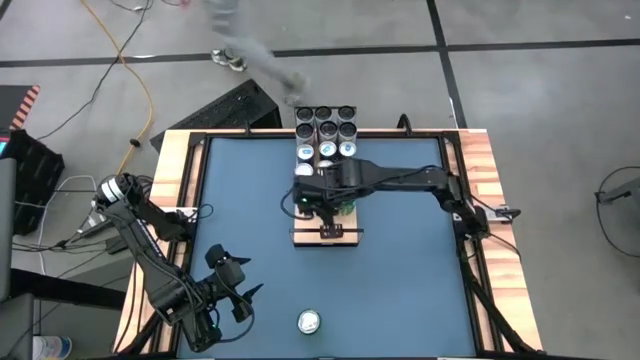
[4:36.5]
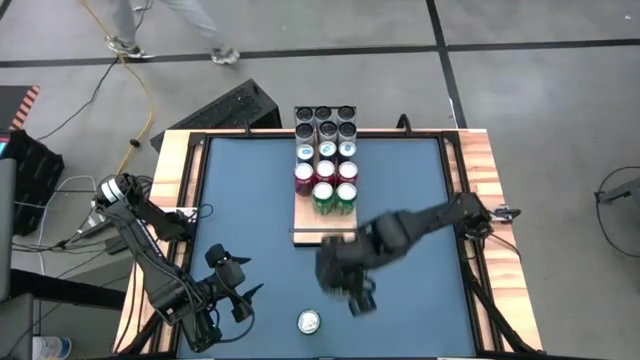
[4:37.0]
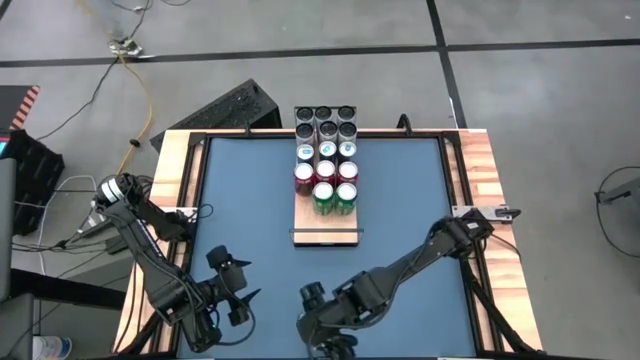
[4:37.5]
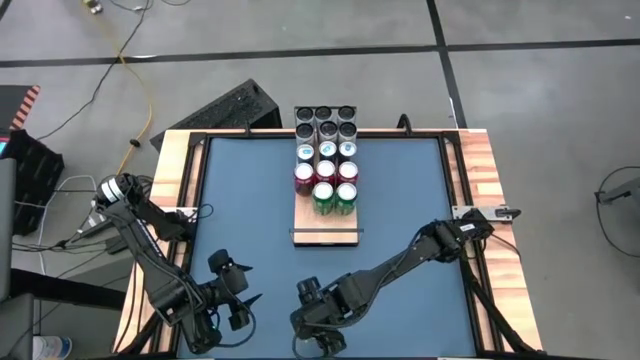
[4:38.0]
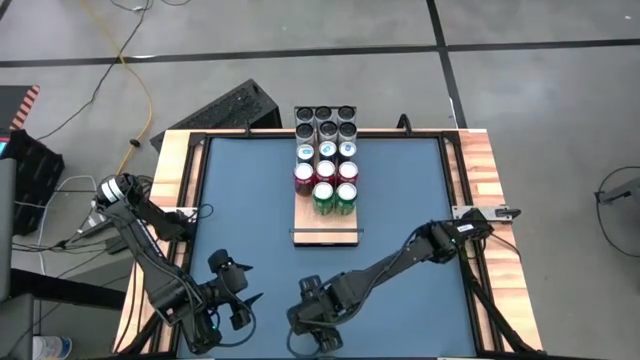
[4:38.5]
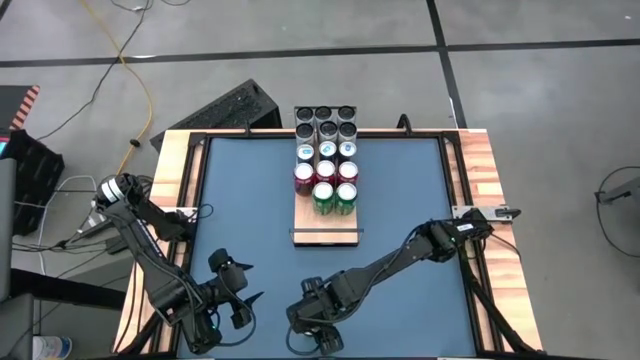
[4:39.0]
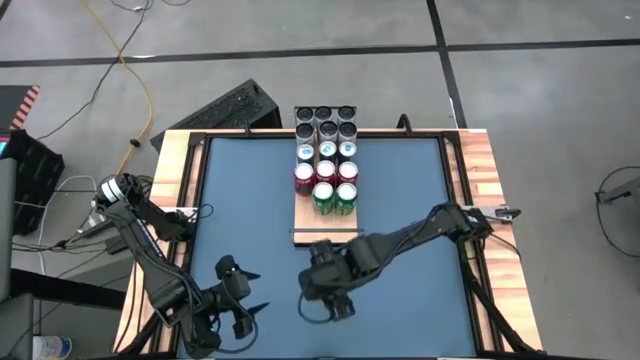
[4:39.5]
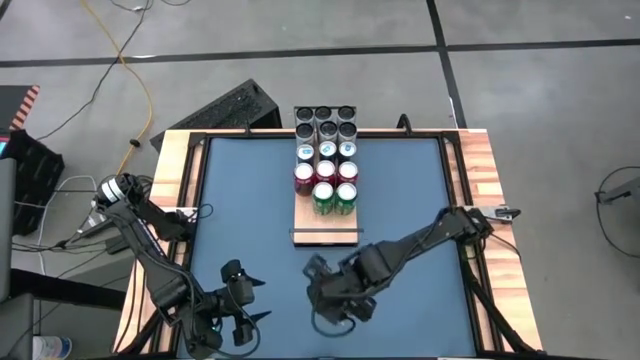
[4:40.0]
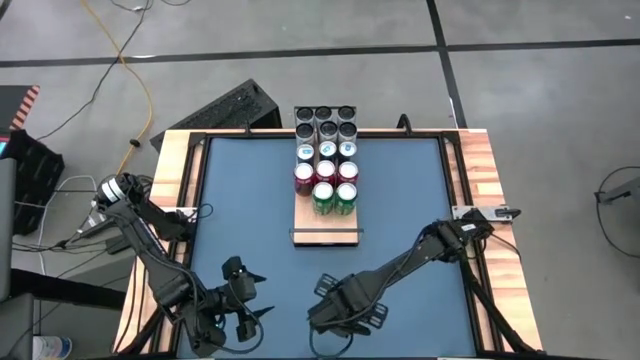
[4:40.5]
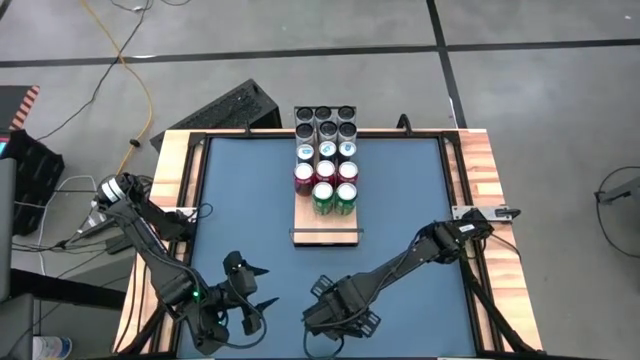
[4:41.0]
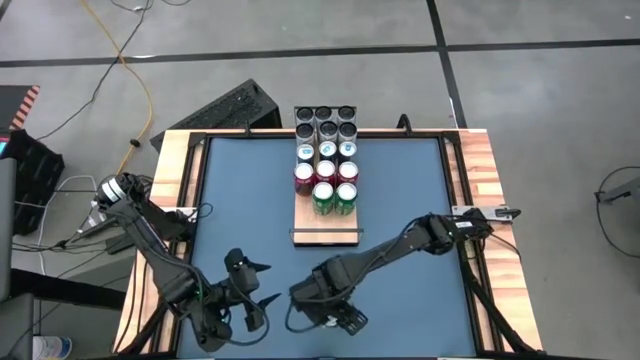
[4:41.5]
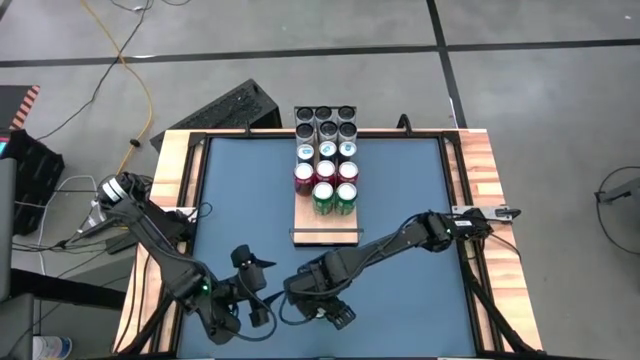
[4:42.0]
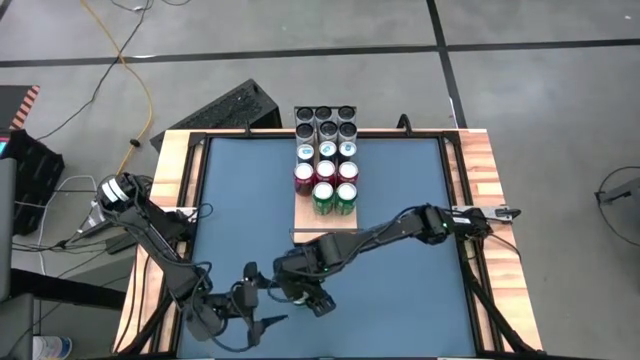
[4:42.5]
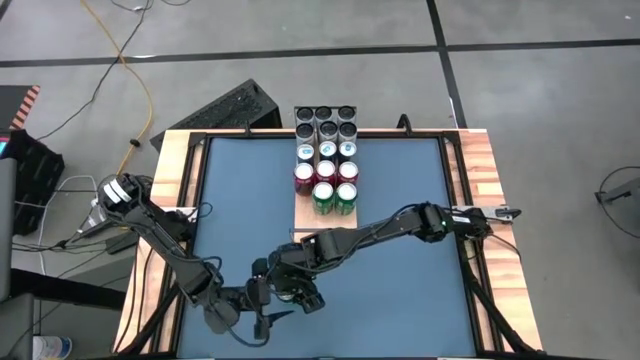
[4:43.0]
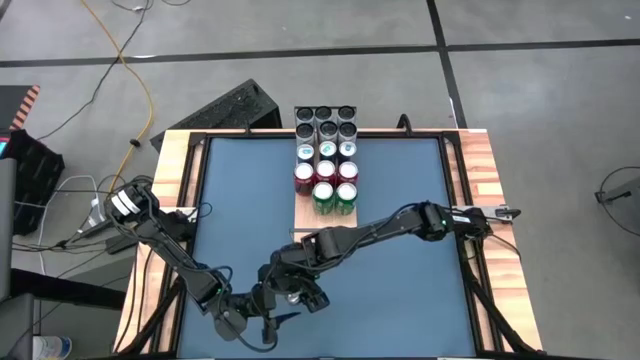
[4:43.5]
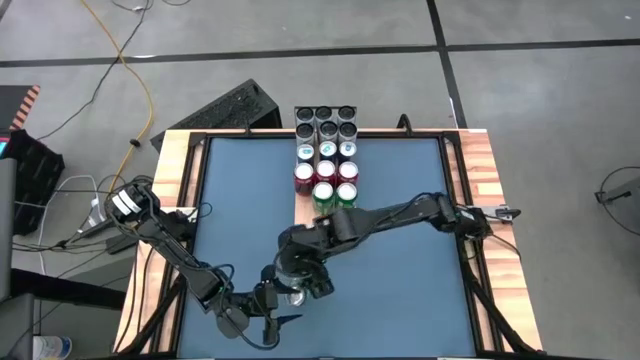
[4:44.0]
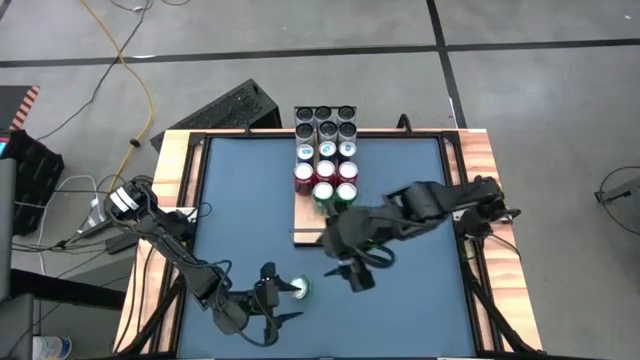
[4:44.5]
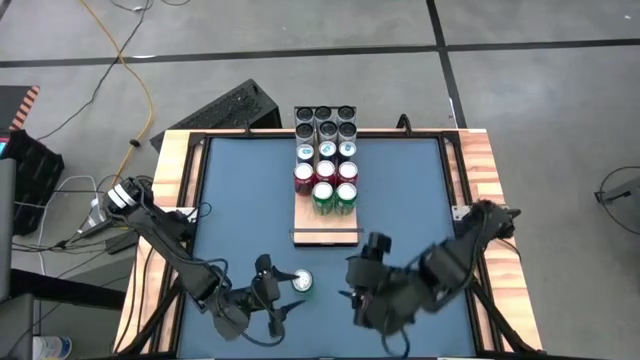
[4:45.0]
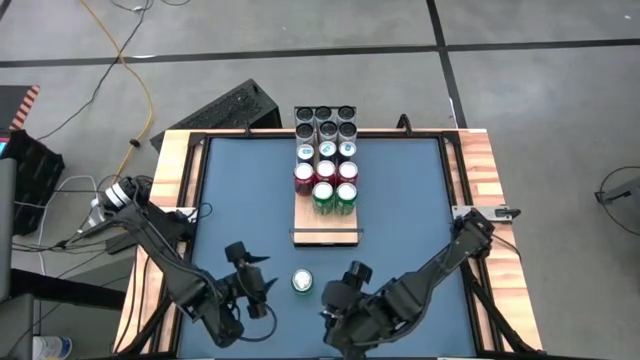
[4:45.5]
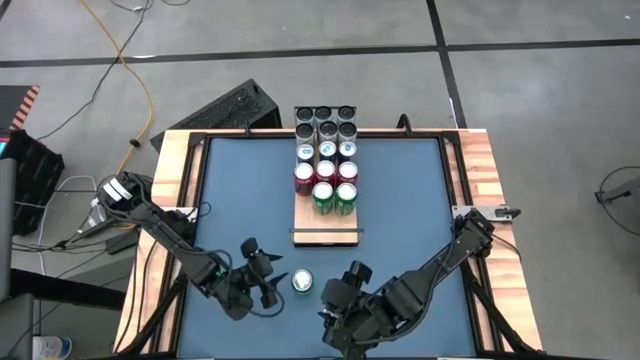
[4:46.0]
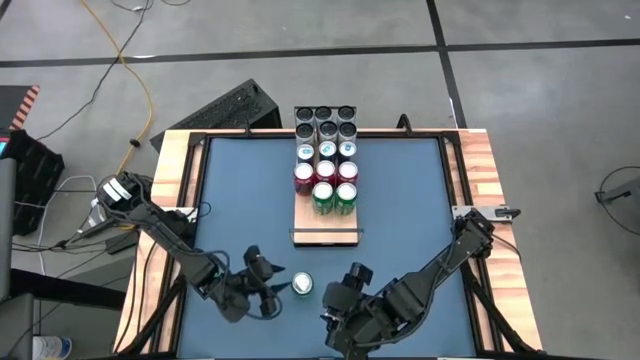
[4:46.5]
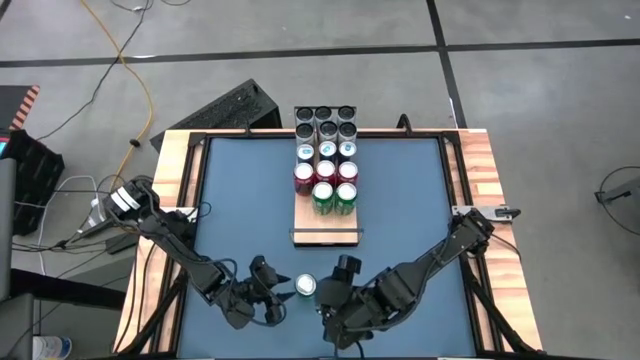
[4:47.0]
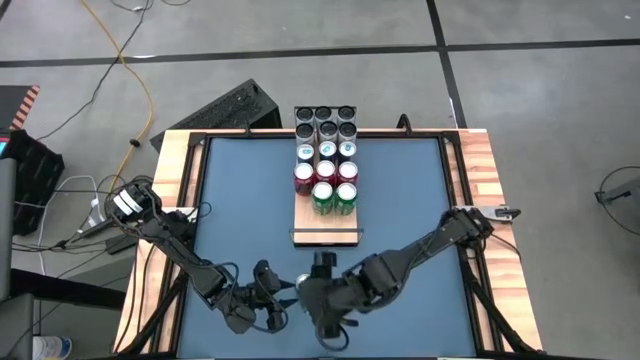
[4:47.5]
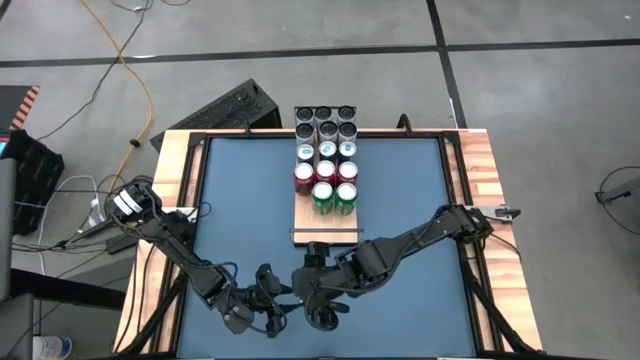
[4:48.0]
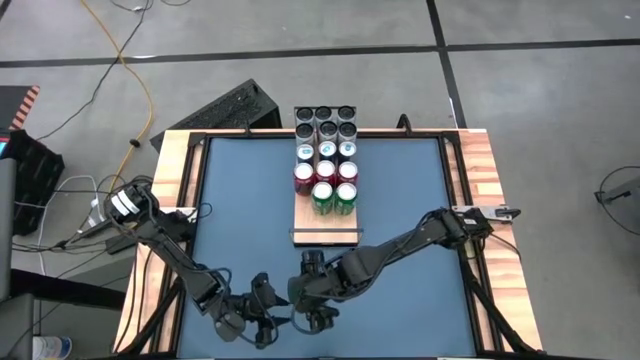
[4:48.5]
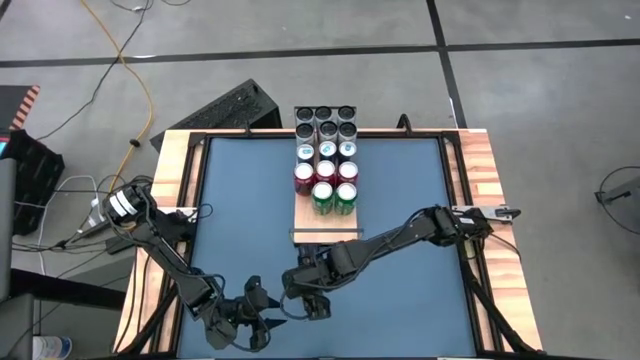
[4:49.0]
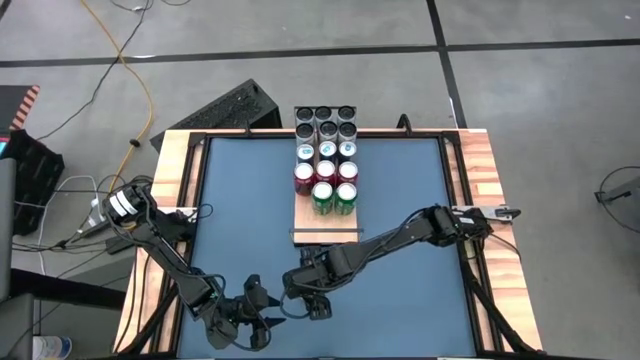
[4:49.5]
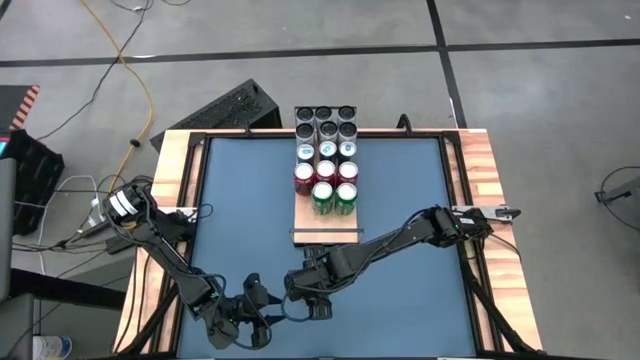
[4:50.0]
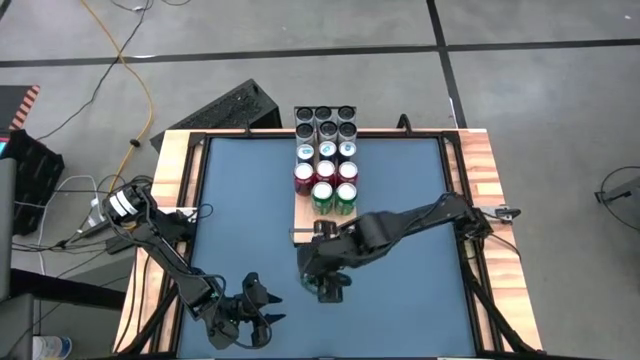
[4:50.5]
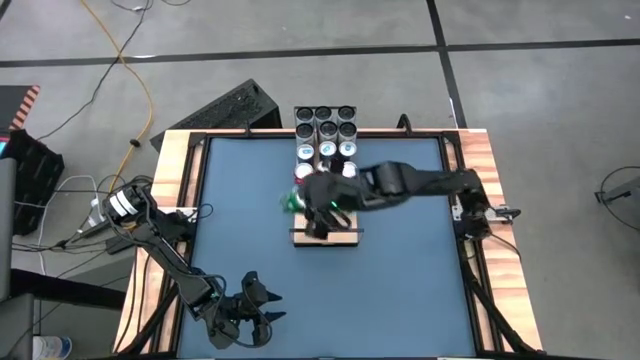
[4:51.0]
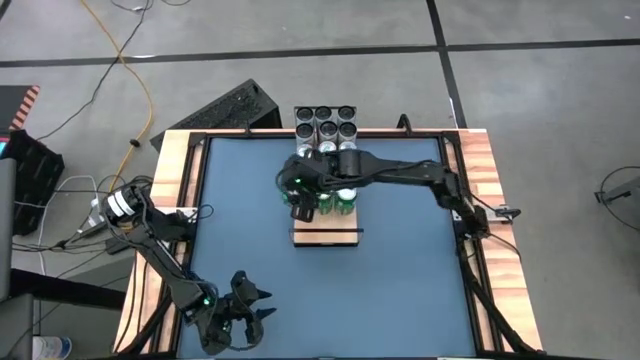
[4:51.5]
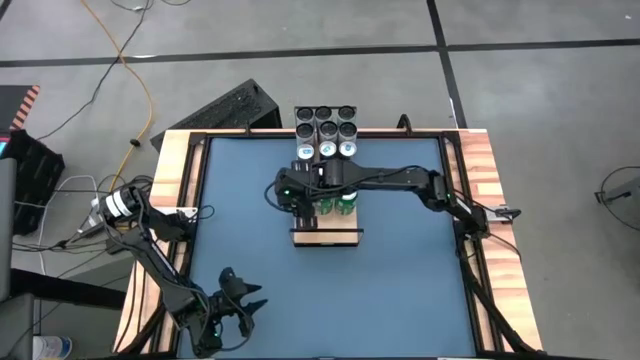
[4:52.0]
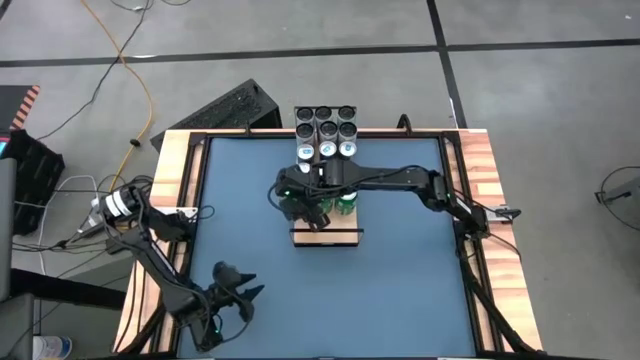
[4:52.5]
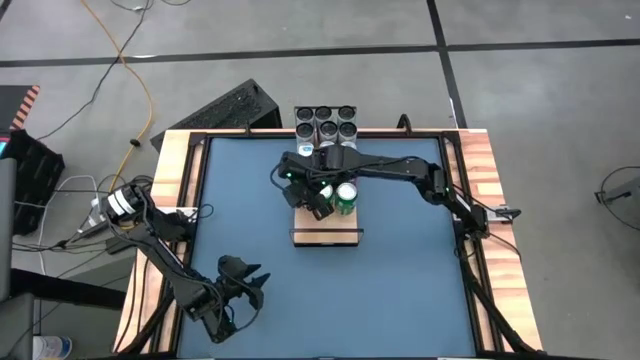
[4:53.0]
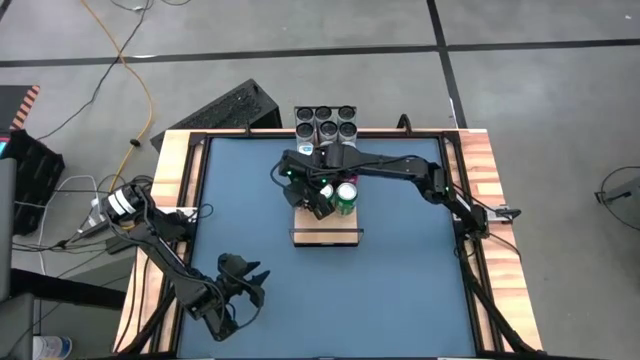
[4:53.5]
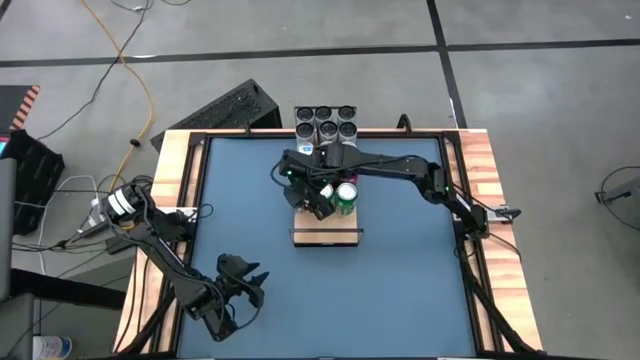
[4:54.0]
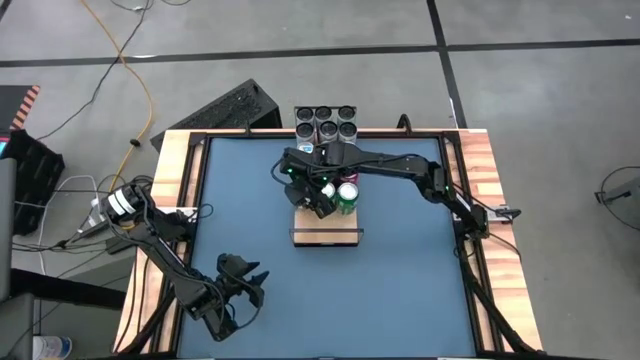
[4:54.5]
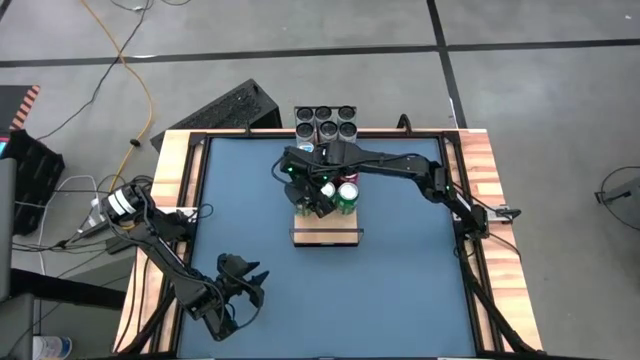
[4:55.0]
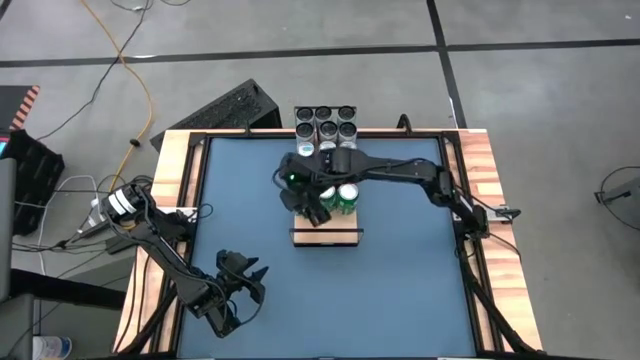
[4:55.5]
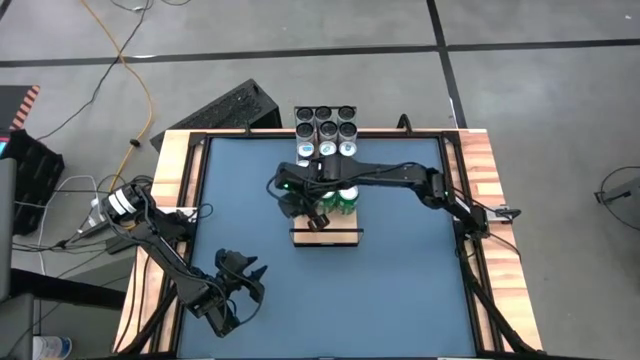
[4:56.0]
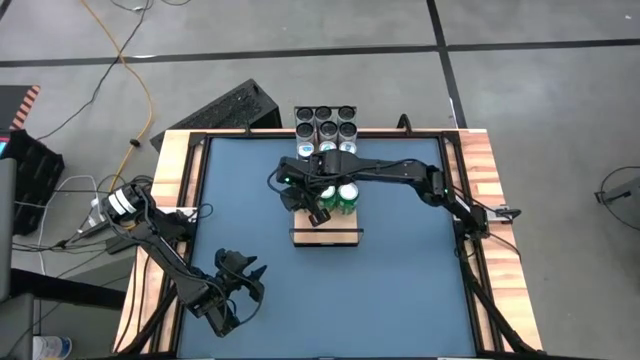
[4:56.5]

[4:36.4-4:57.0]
Task: Place canned beverage on shelf
Put the green soda can on the shelf aligned with the other green soda cans
